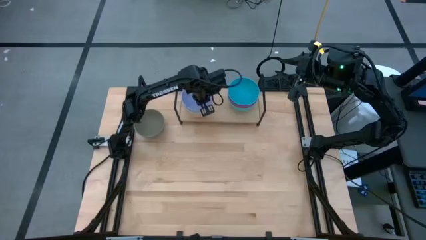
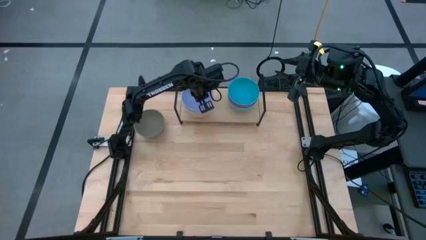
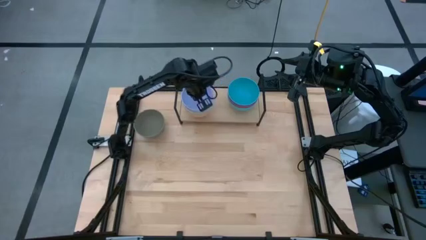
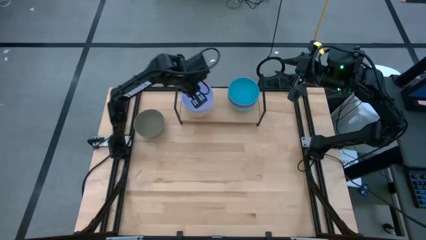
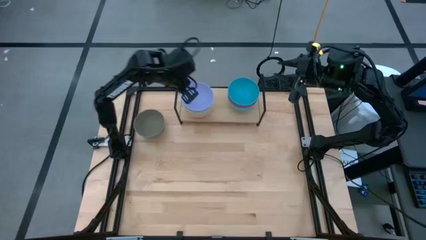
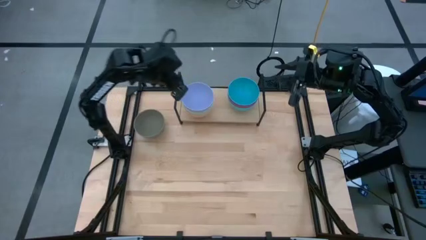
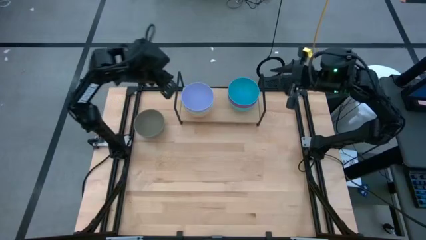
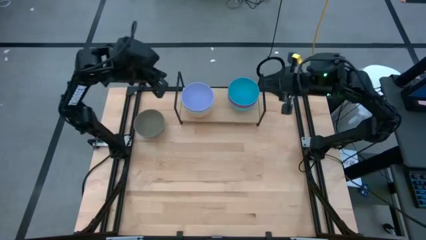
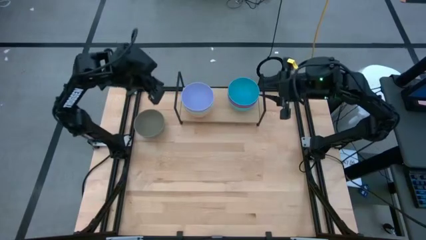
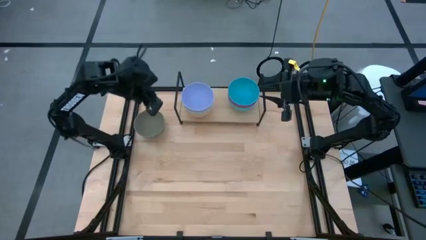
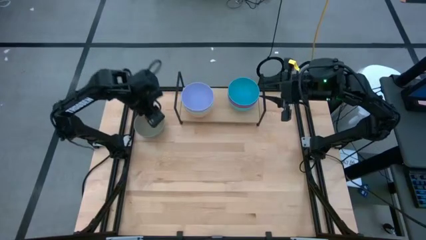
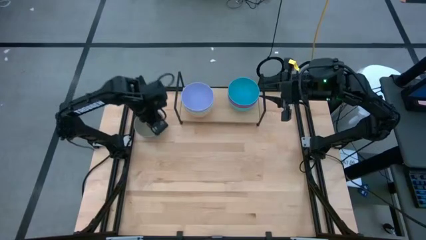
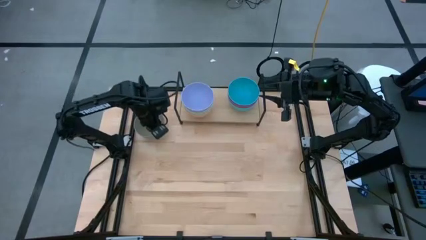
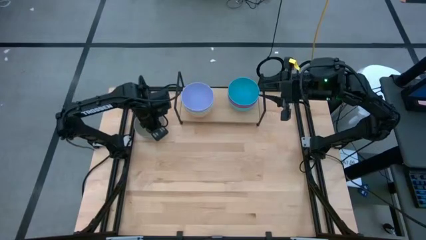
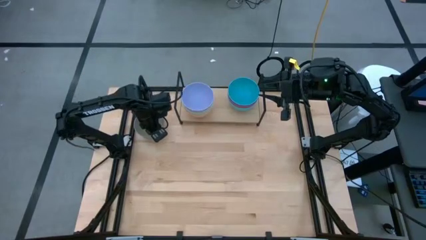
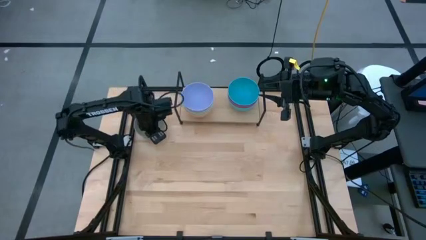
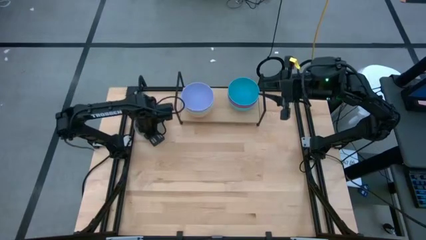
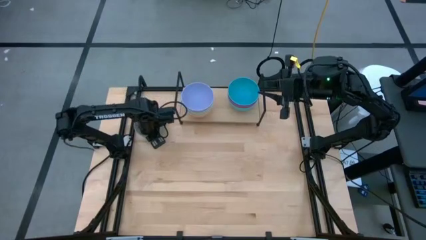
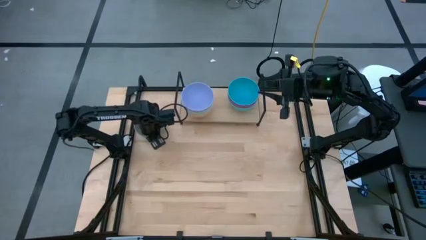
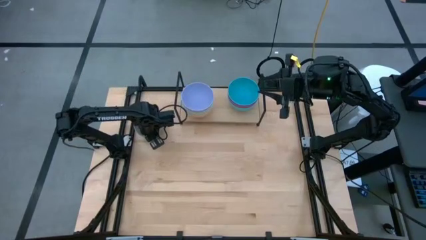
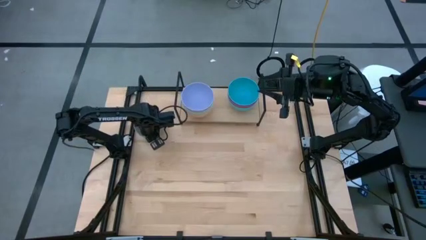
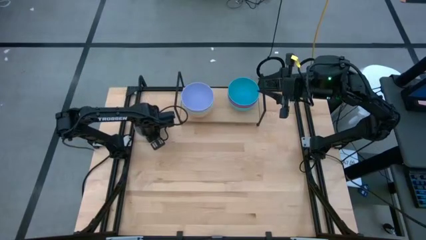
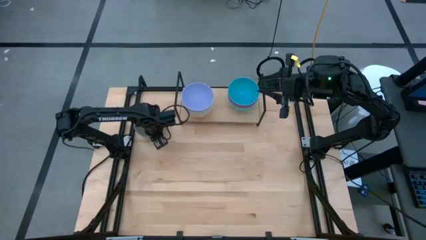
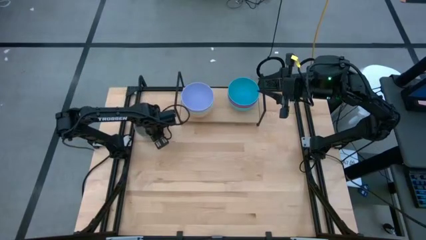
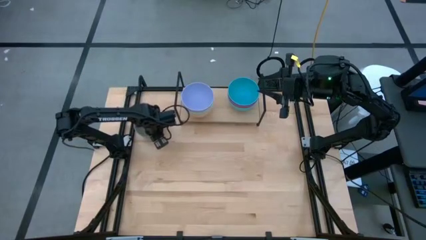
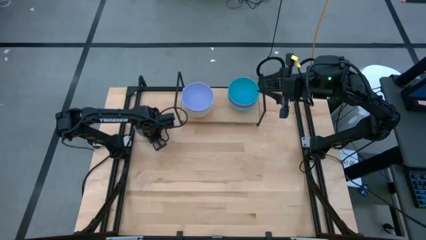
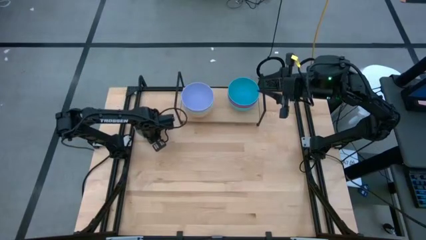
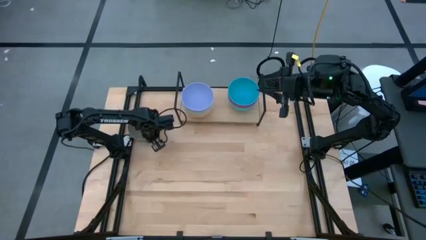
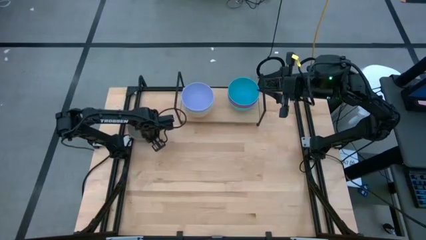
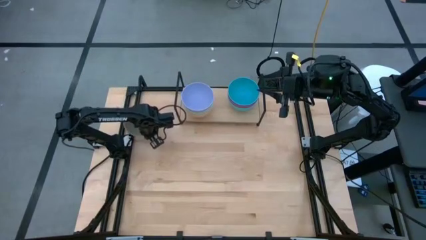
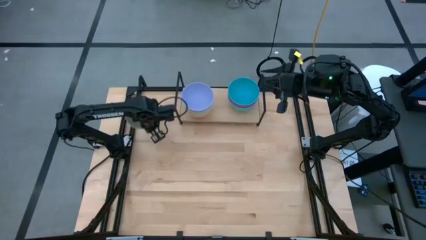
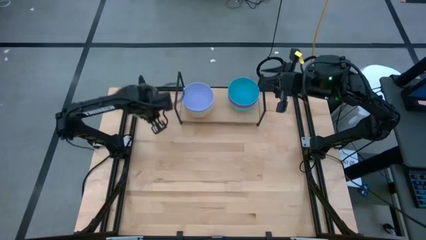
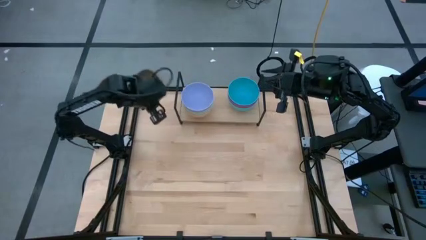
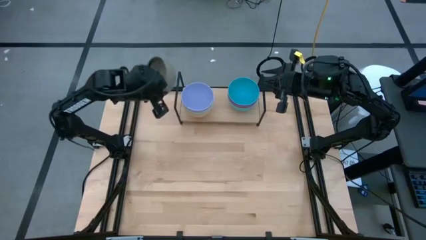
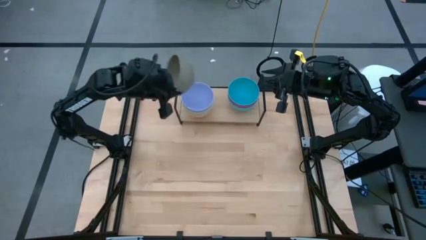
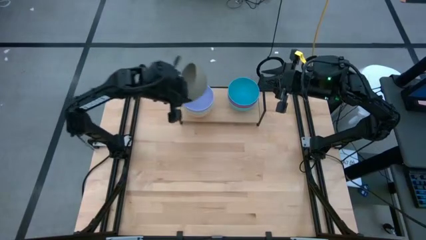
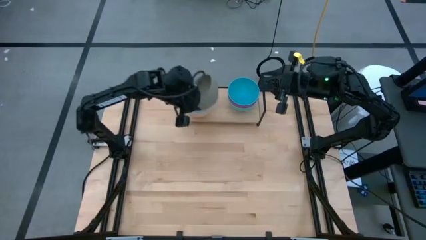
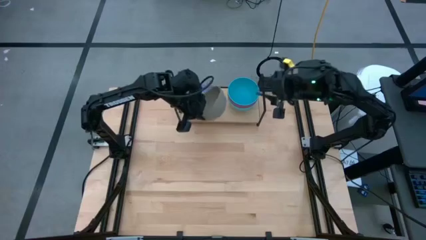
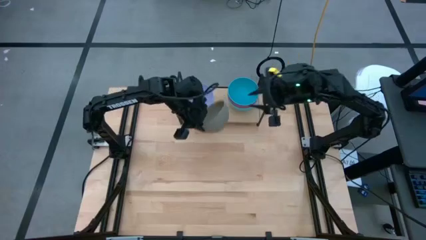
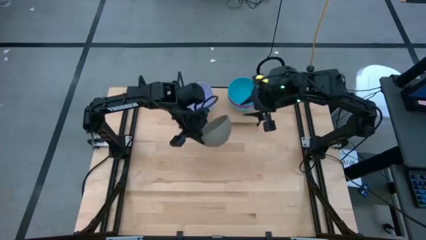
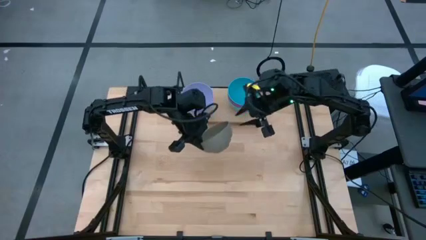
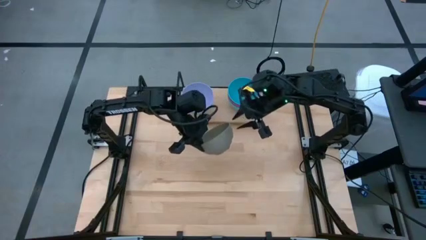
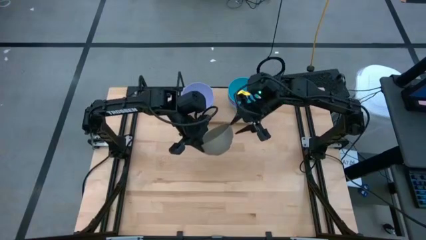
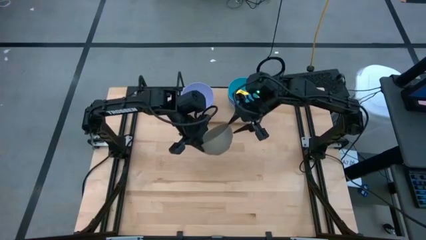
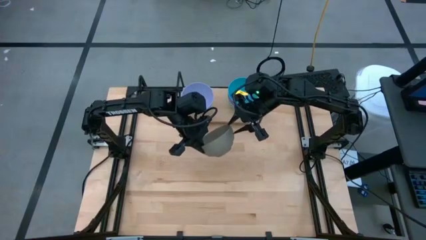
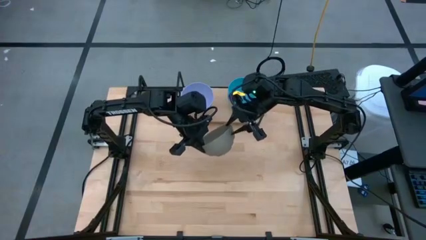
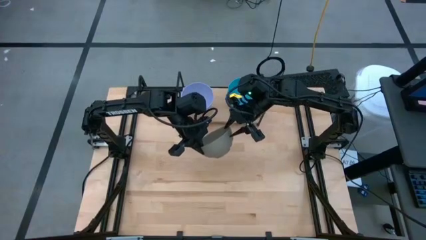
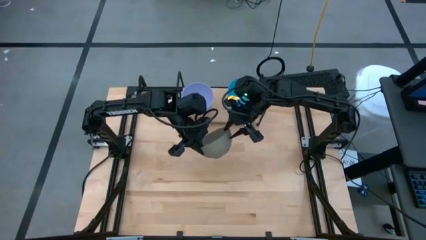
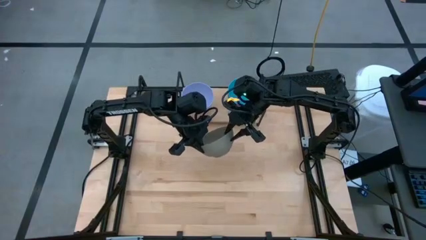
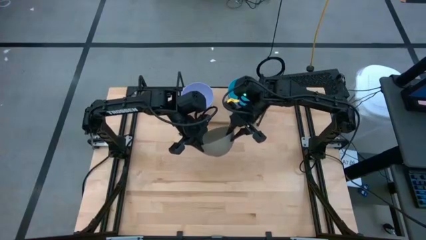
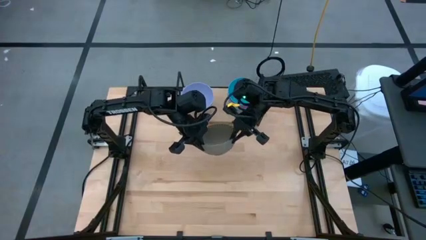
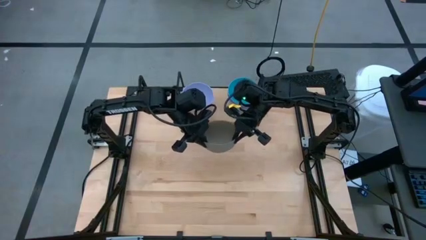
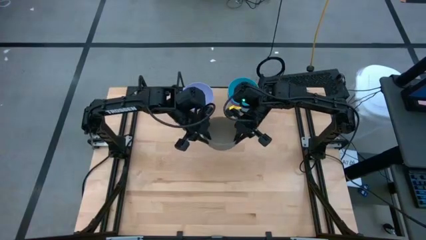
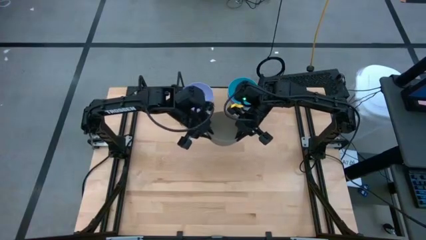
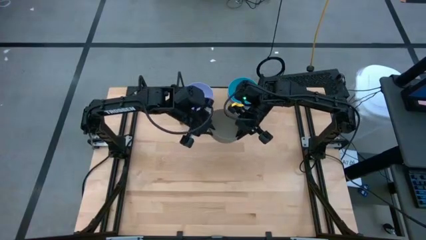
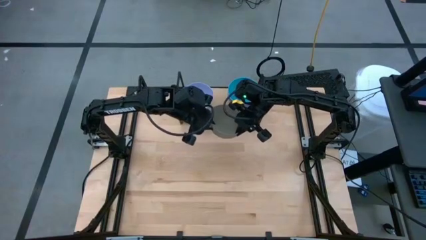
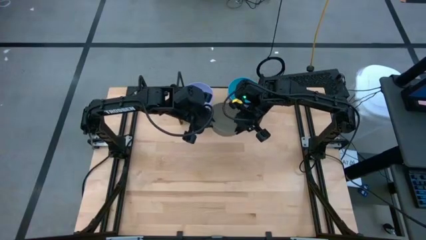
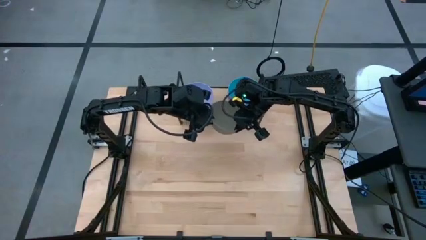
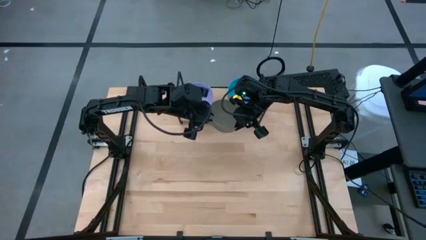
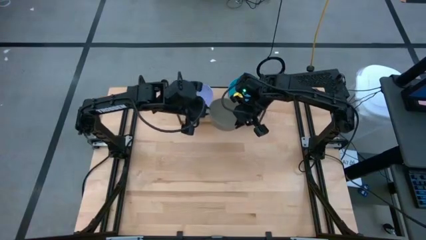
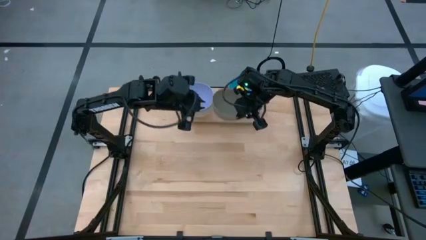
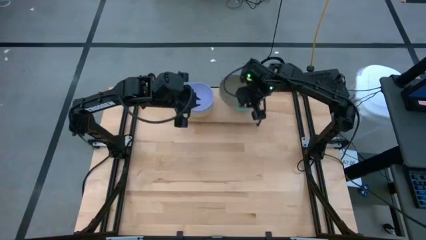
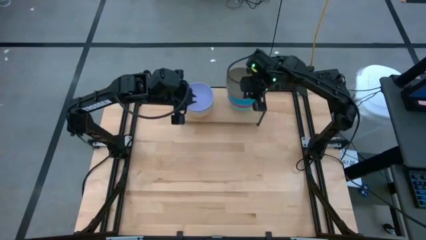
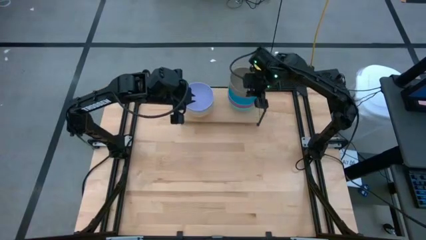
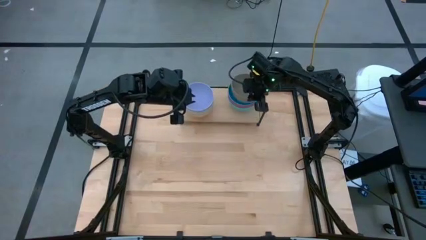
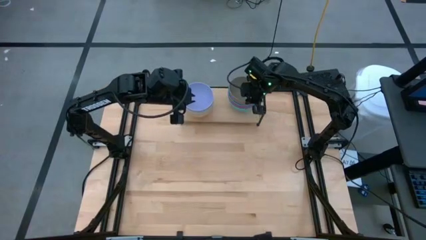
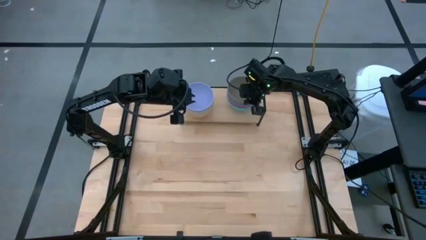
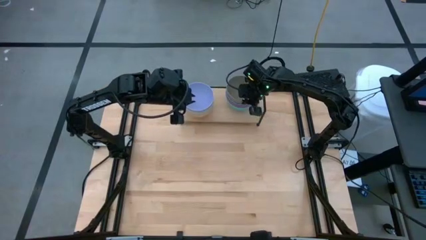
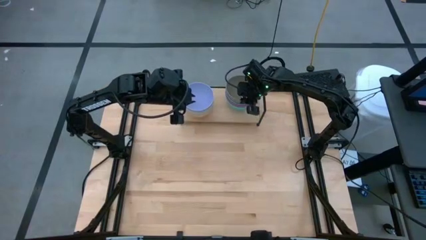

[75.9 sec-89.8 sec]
Task: Place and stack bowls onto a shelf
Stack the gray bowl on top of the blue bowl on the shelf
